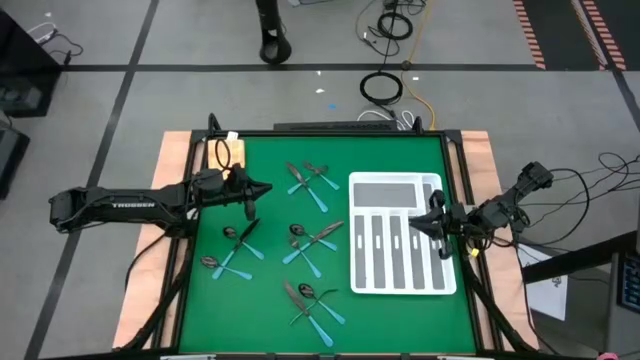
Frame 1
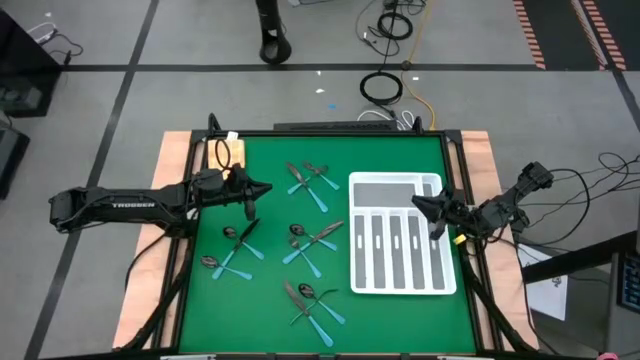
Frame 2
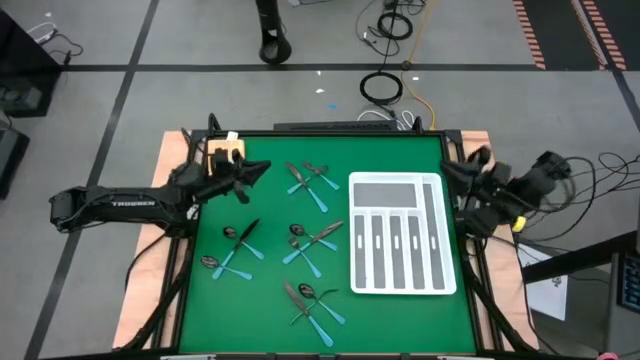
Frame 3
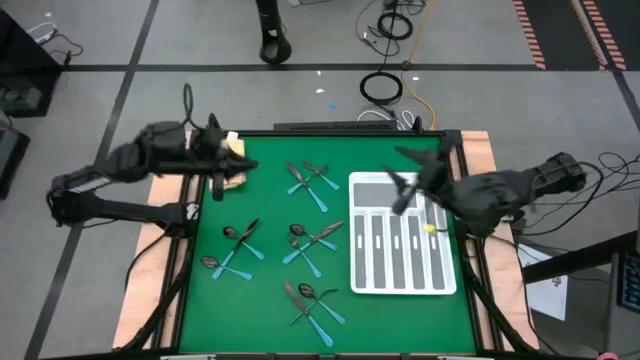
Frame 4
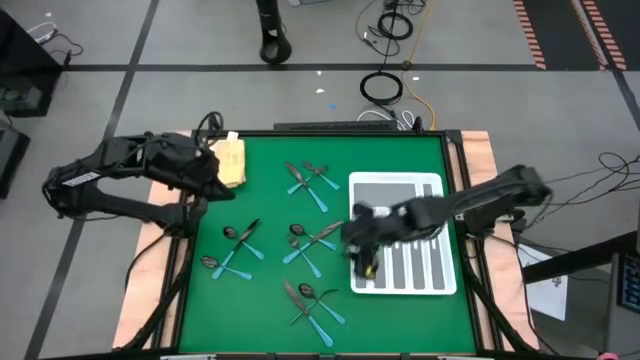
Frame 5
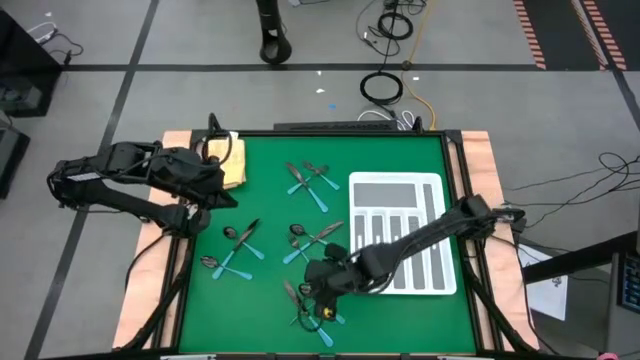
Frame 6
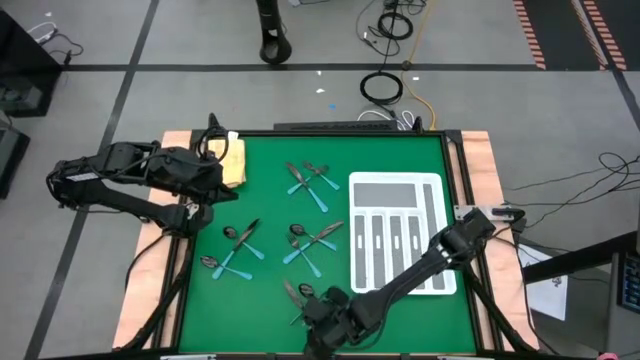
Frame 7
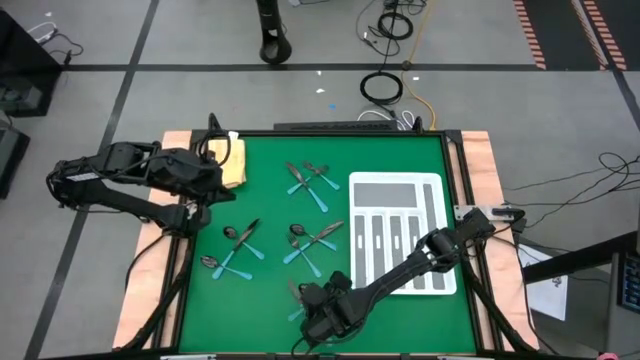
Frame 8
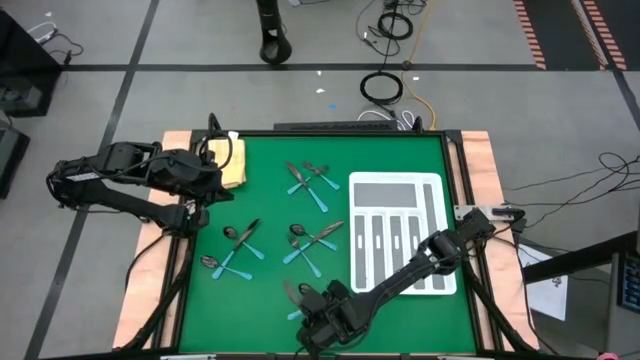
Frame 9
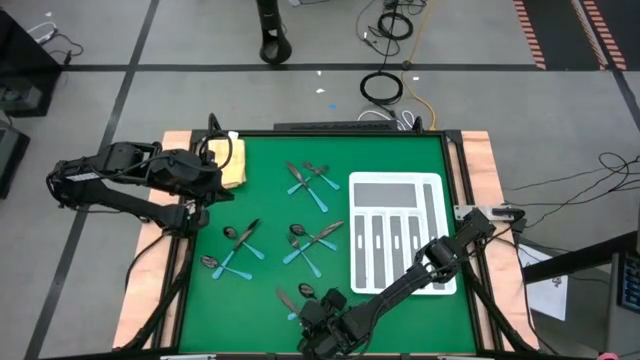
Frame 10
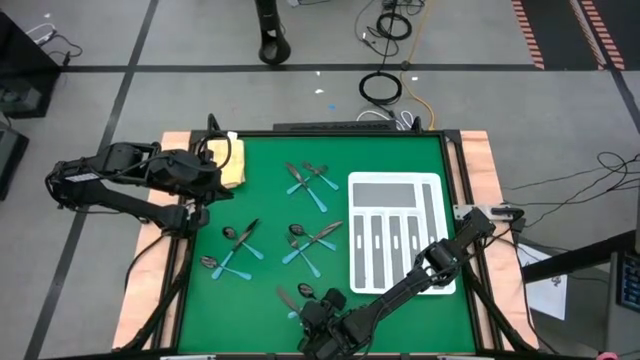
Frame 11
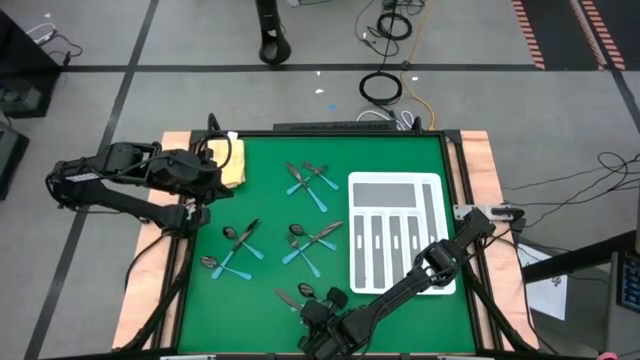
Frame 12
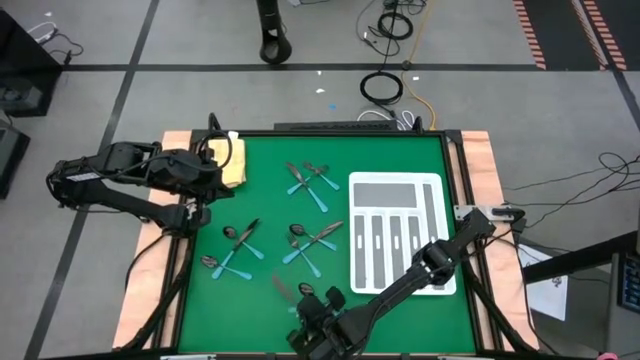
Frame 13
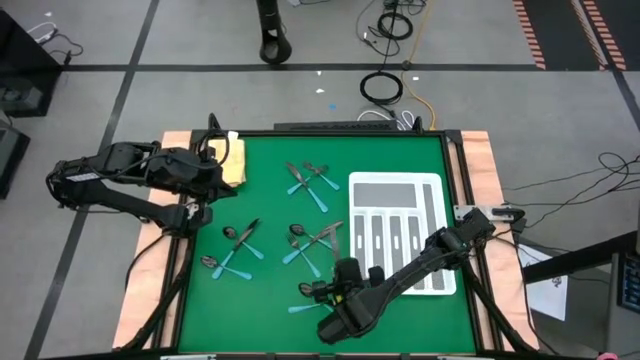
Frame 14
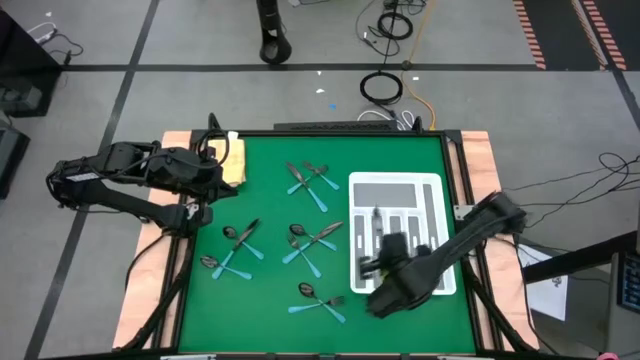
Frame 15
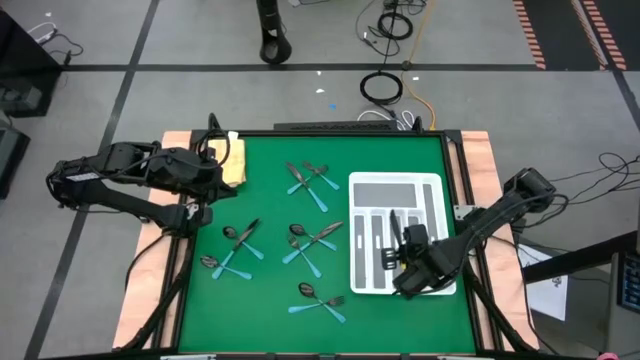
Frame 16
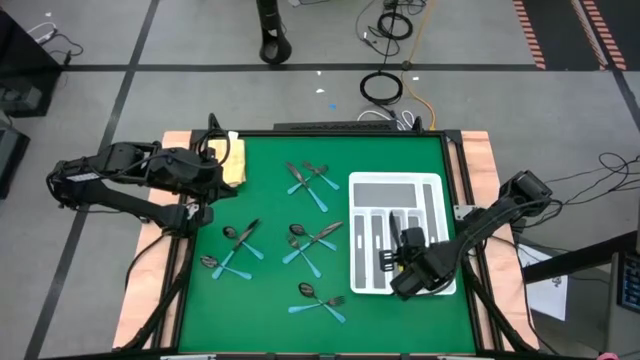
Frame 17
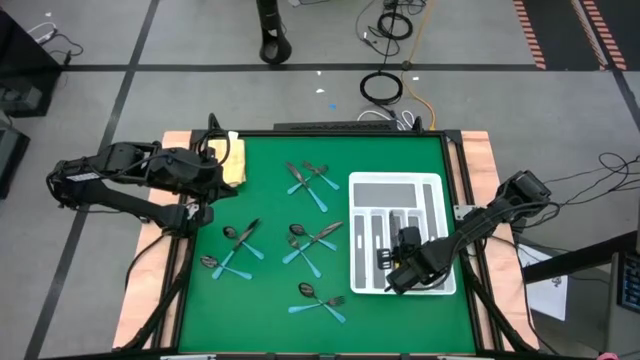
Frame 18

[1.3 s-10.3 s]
Task: Sort silverware
Put the bottom blue knife into the tray

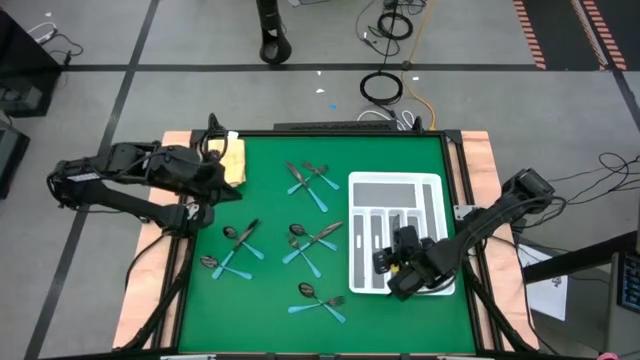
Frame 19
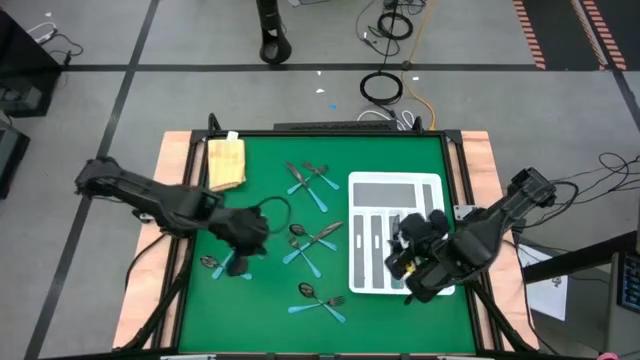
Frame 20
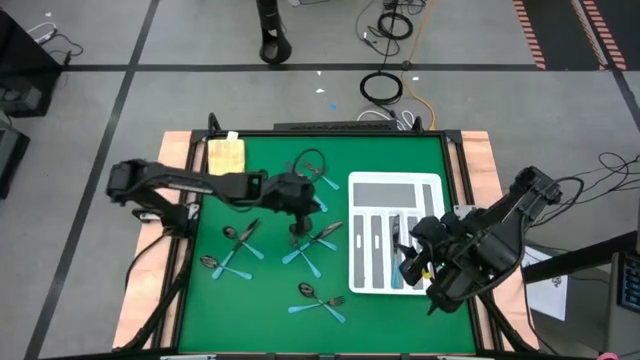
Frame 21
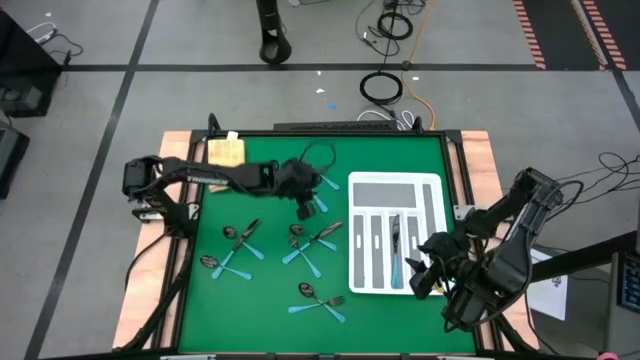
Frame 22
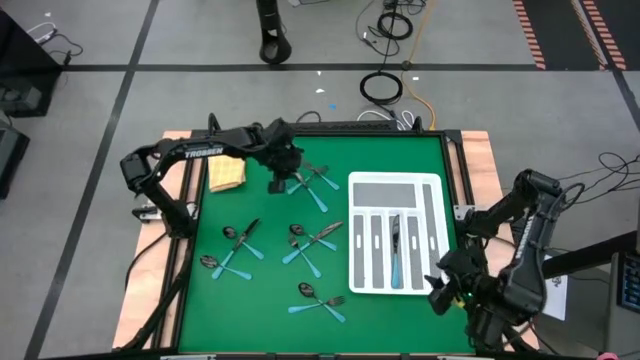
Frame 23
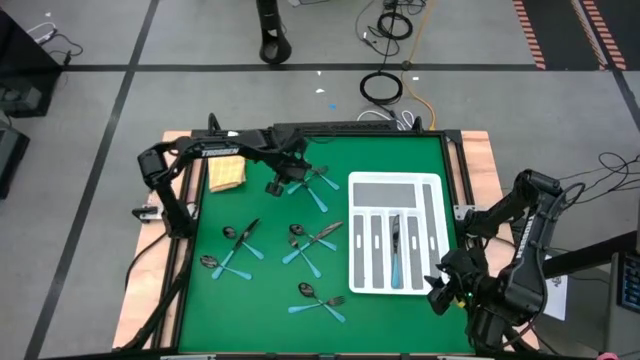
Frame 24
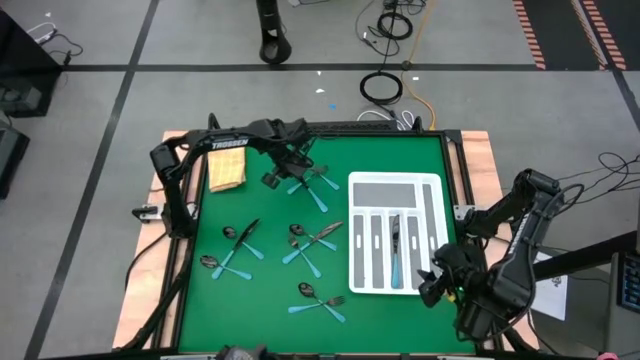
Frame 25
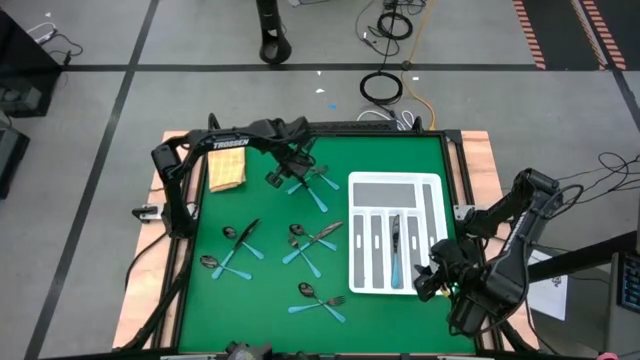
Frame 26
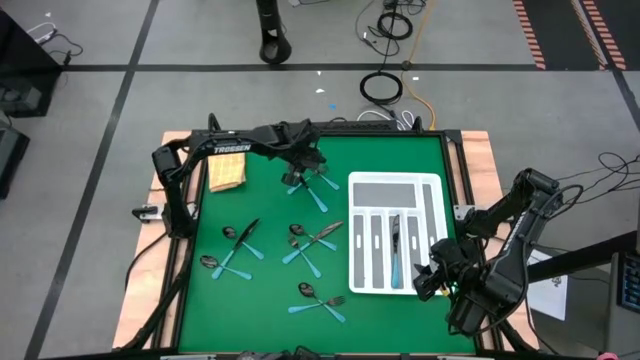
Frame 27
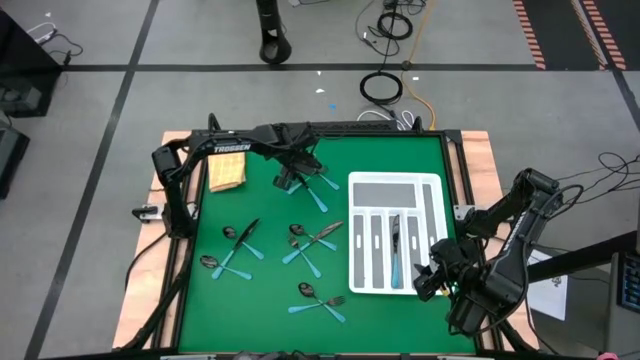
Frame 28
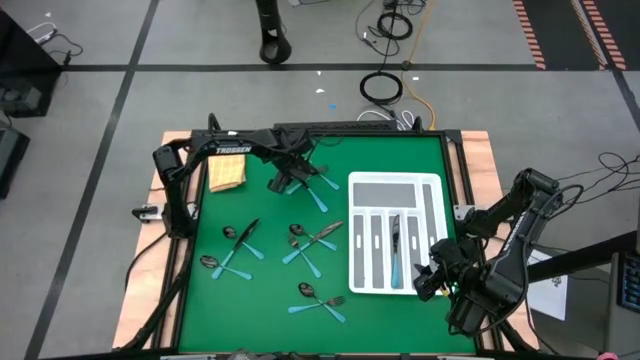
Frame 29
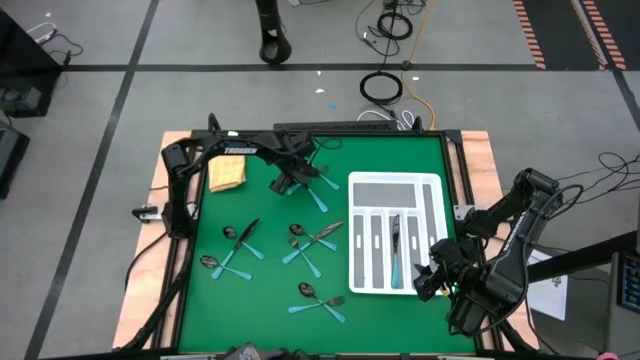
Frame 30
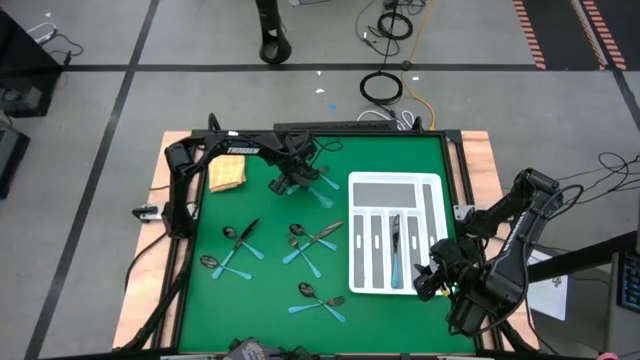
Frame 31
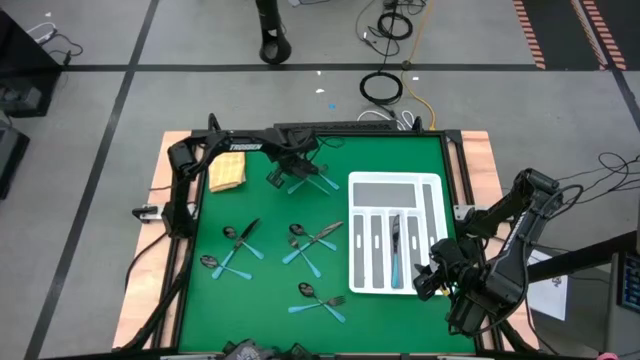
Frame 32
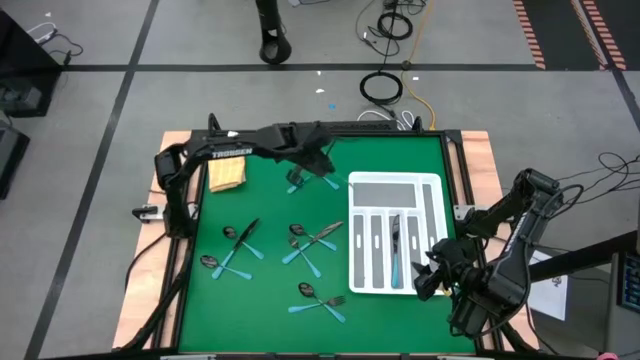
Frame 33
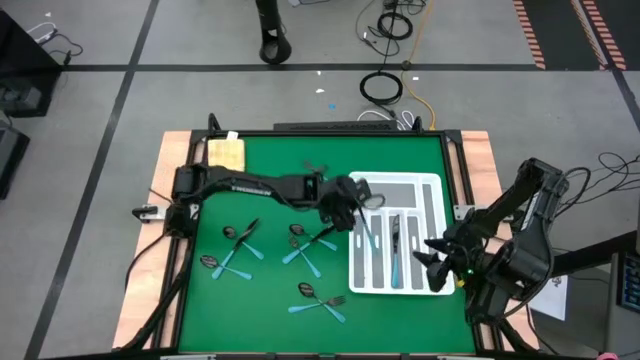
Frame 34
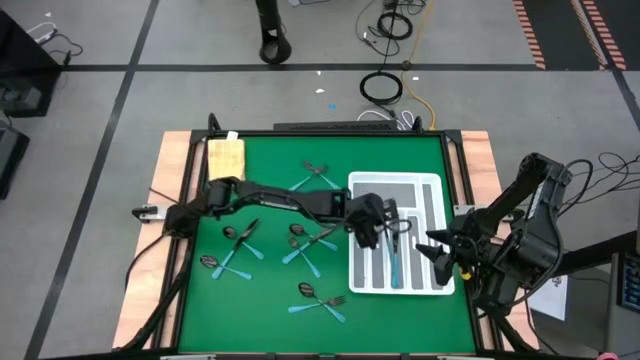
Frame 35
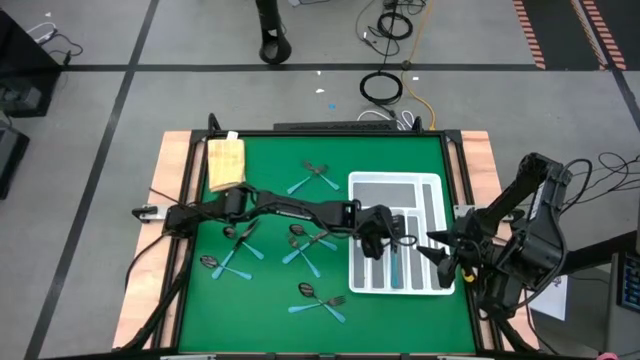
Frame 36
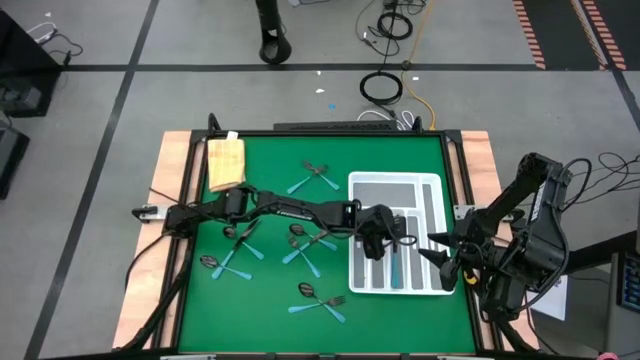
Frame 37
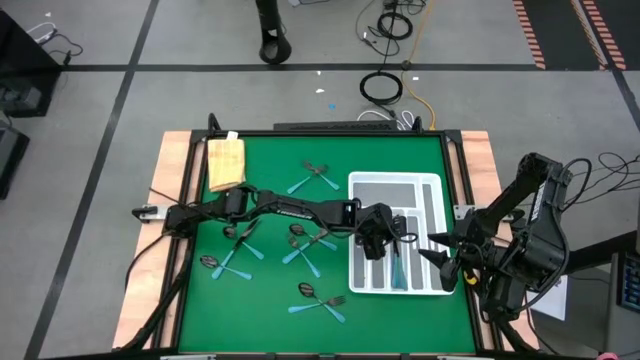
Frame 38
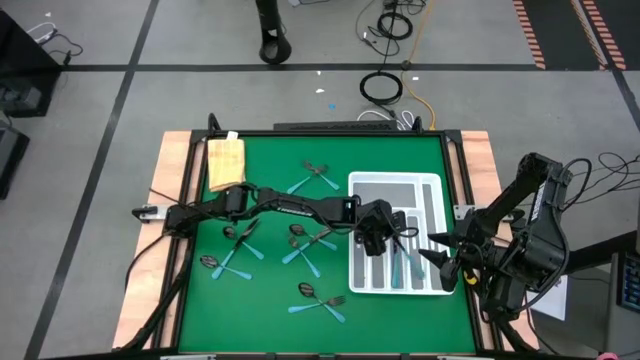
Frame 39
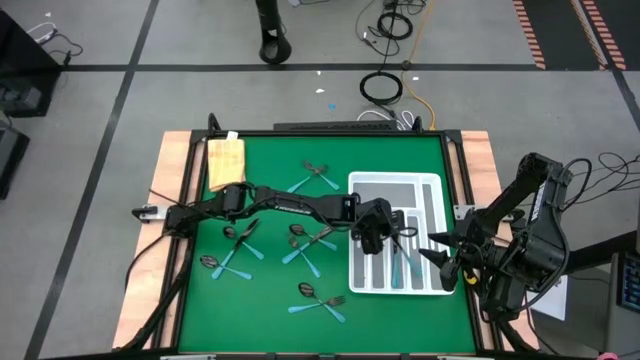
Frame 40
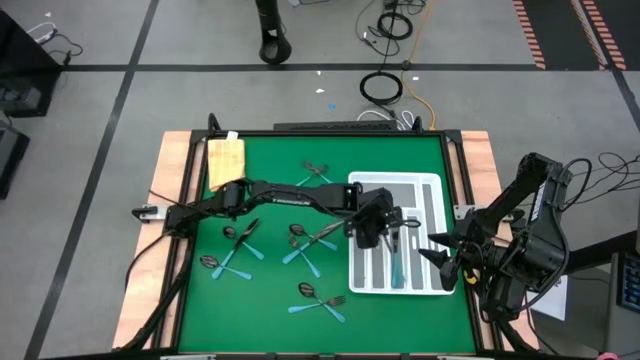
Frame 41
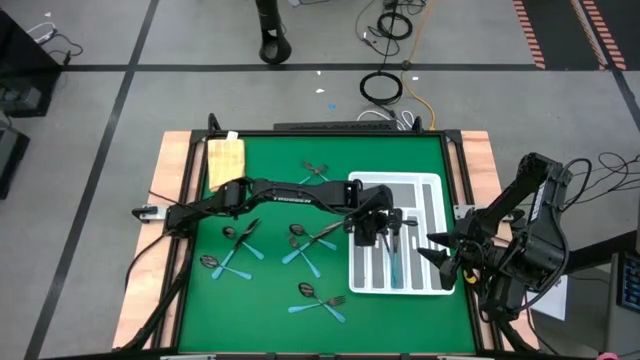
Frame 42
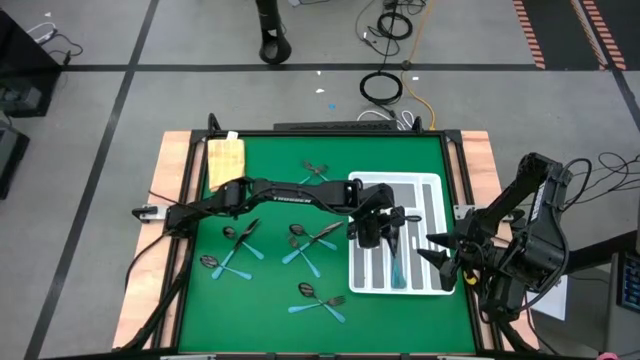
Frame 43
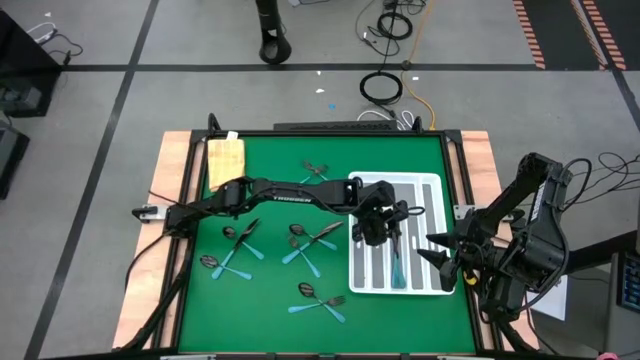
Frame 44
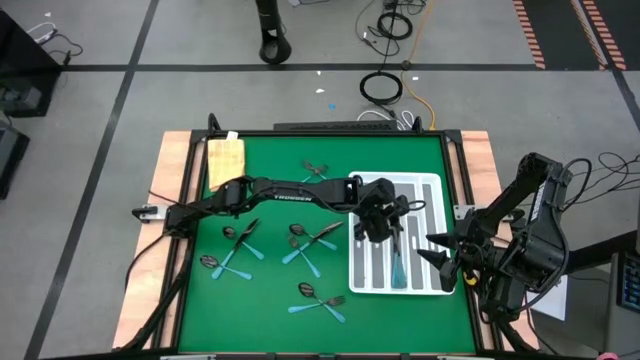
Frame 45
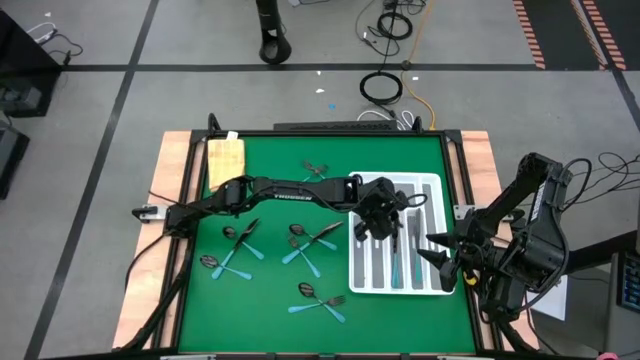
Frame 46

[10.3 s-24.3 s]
Put the top blue knife into the tray
